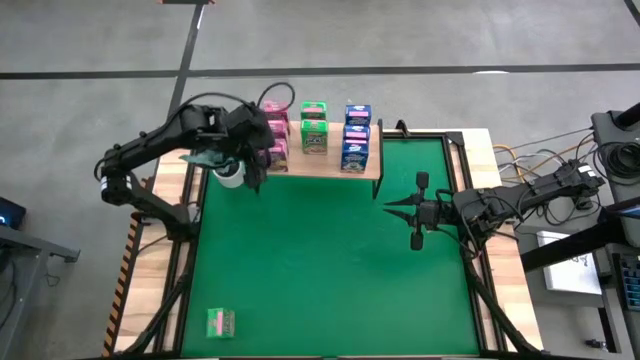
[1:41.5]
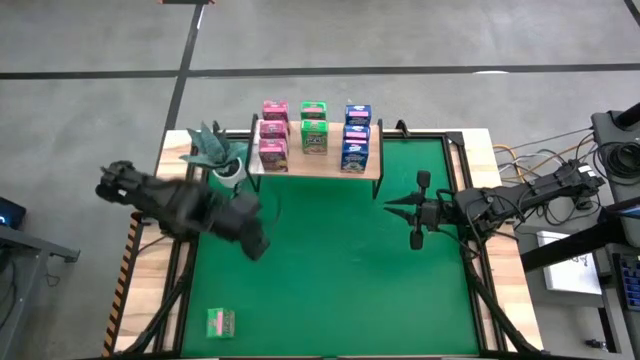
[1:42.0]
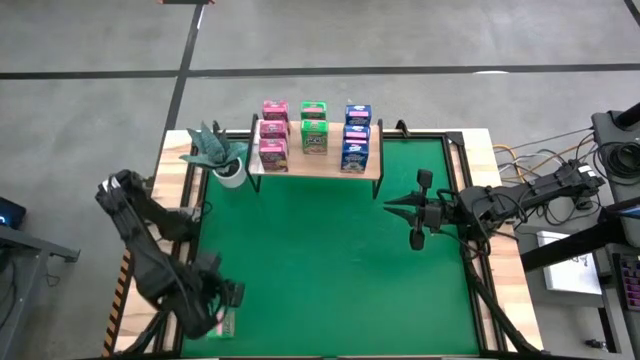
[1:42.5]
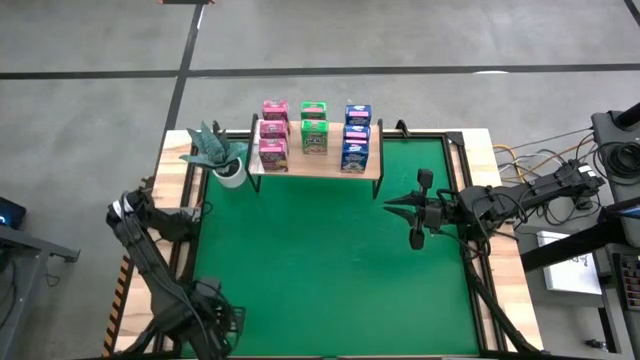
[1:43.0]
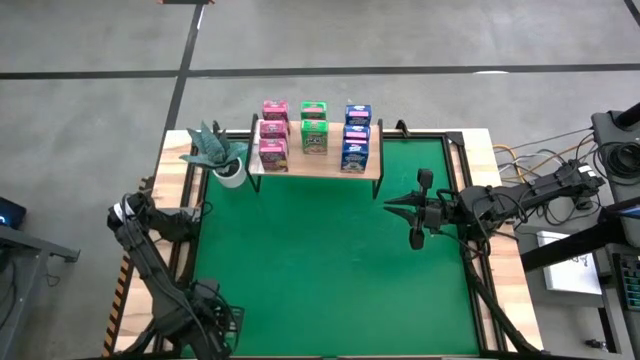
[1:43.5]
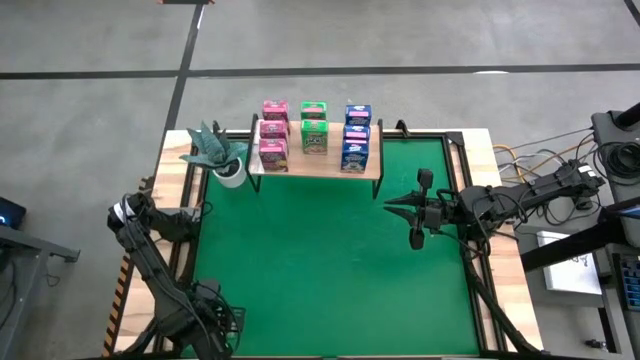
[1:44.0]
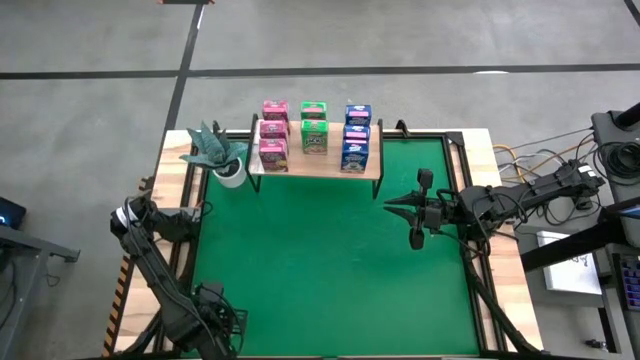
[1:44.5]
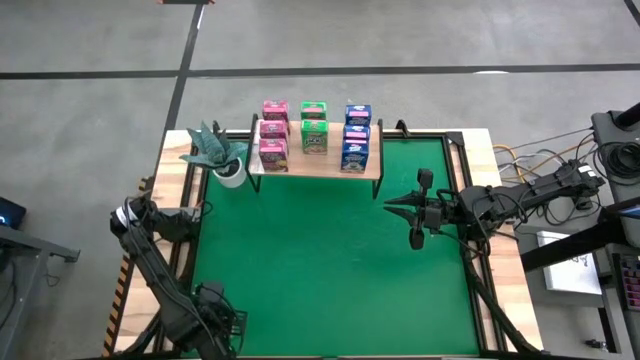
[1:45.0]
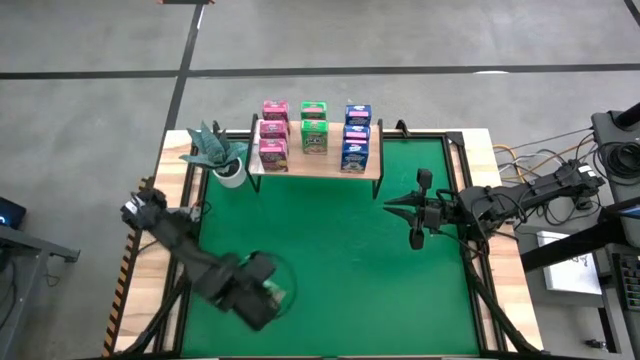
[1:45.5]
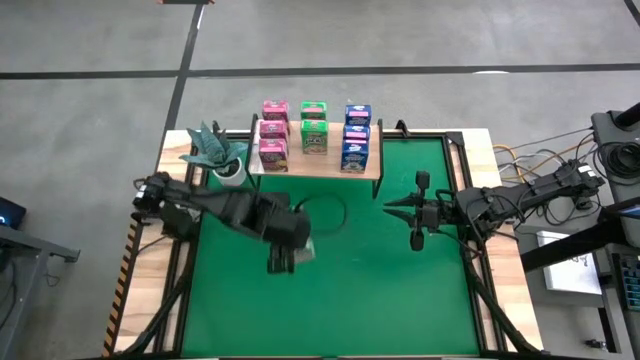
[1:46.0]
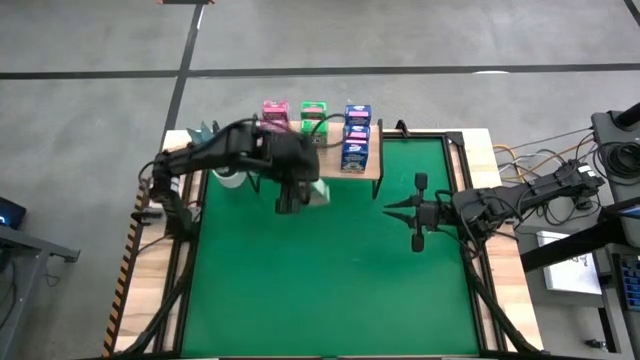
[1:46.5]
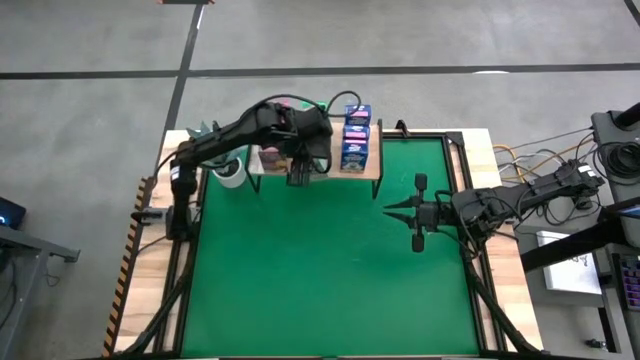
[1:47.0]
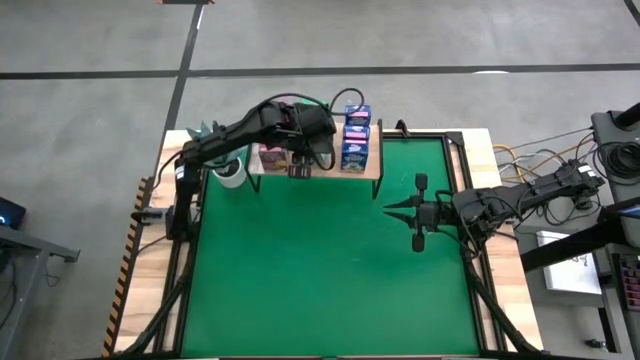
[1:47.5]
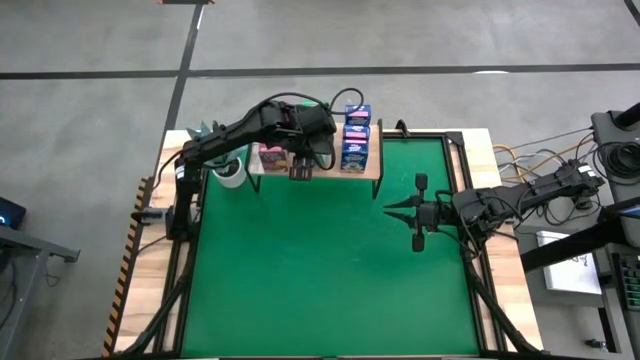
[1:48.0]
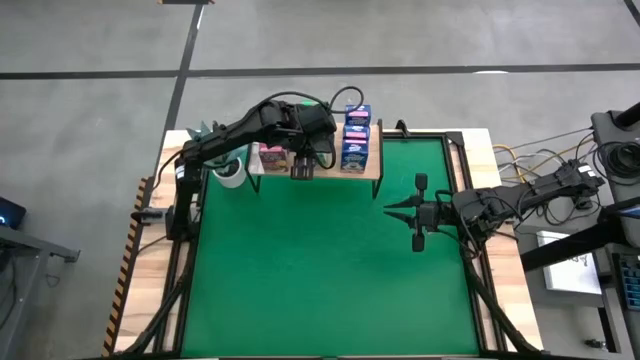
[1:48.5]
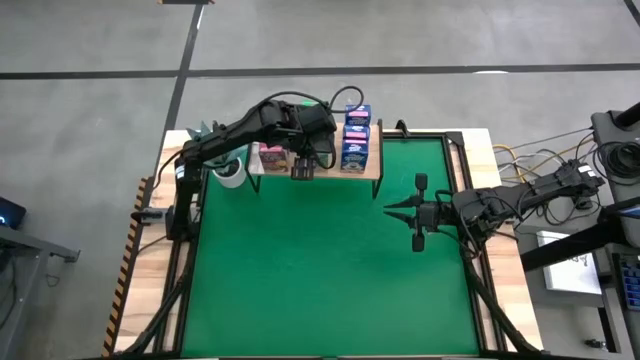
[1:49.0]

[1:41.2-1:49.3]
Task: Stack cereal on shelf
Put the green cereal box on the shelf aligned with the other green cereal boxes

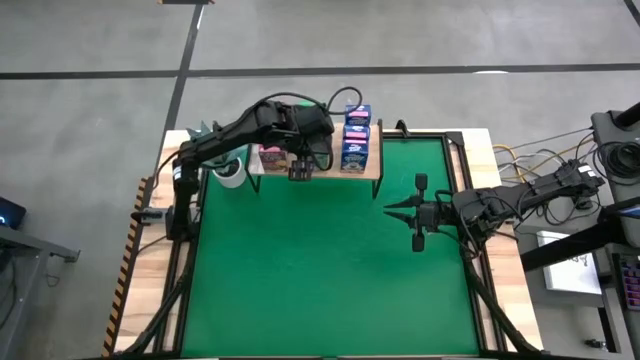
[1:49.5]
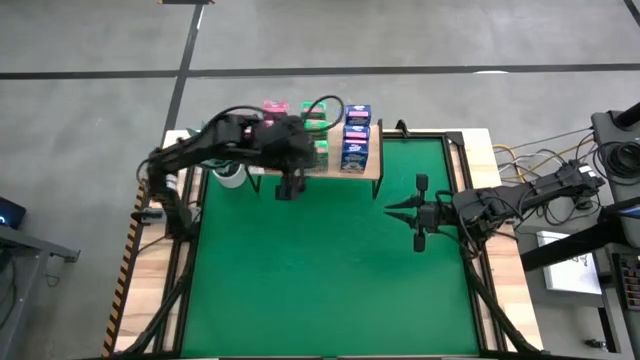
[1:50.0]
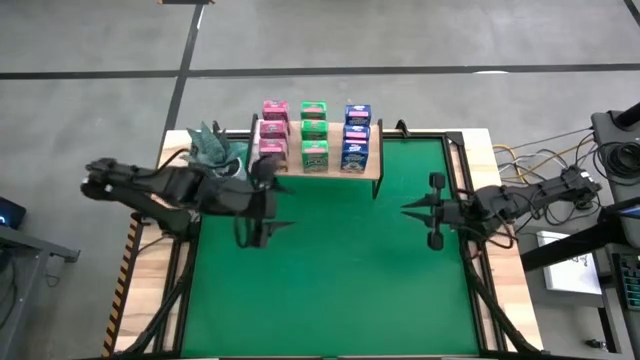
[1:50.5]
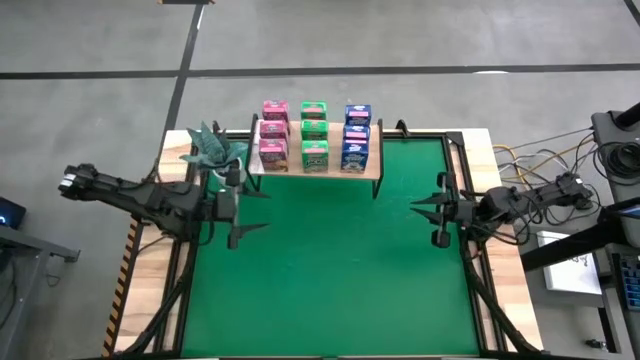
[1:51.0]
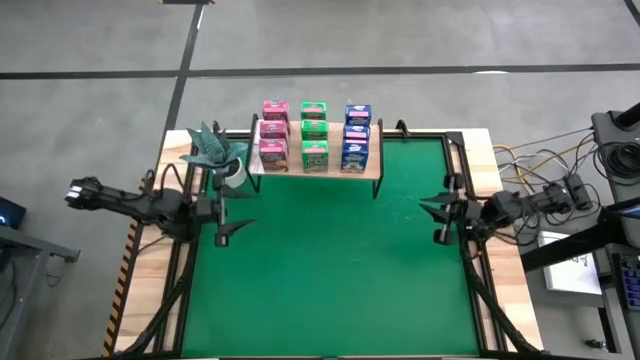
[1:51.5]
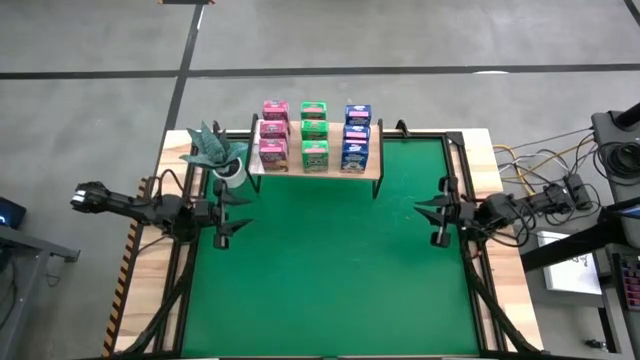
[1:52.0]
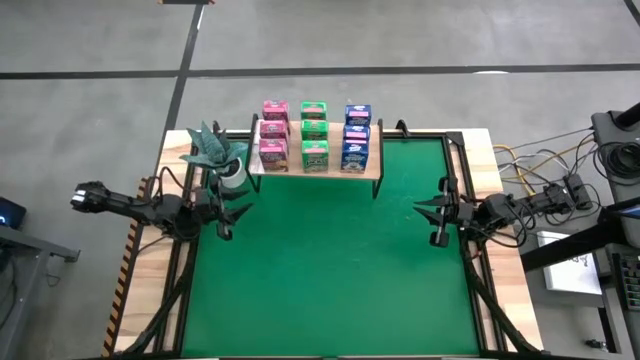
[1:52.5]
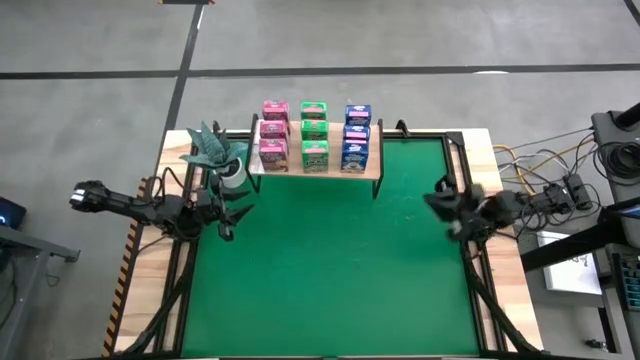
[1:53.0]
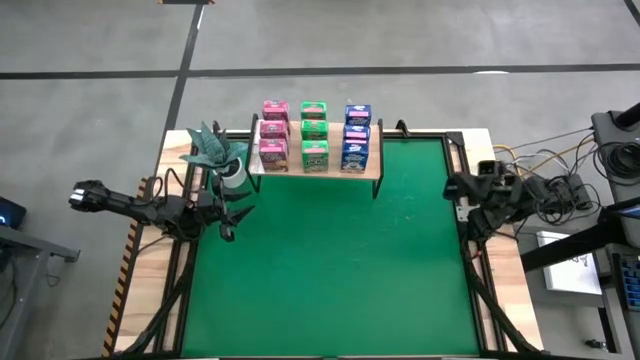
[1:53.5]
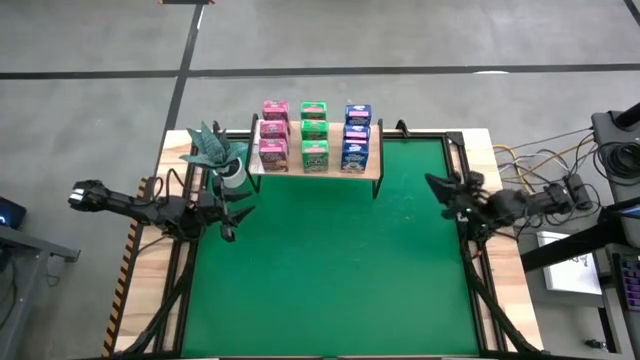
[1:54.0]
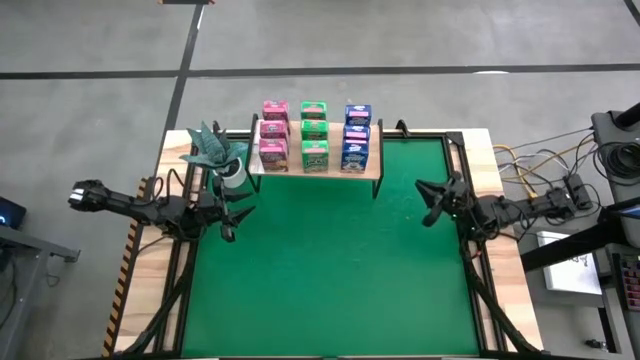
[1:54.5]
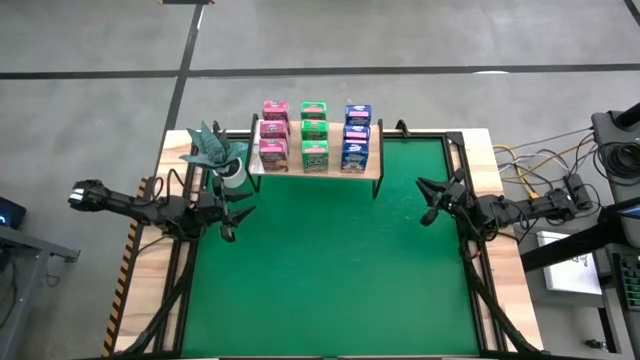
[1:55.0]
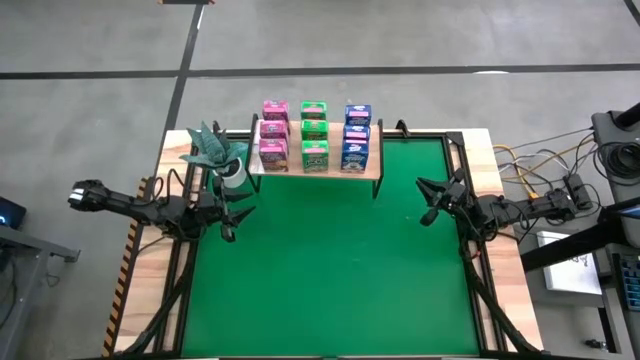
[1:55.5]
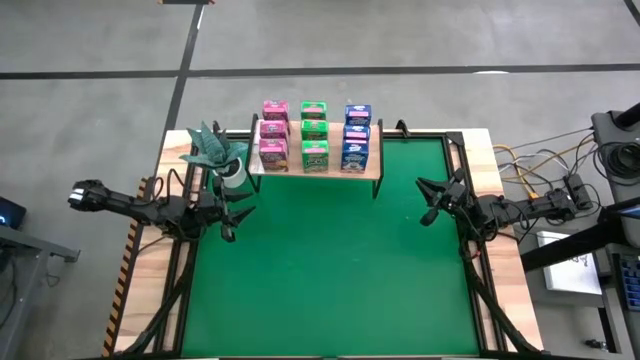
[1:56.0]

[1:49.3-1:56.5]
Return to Home Position

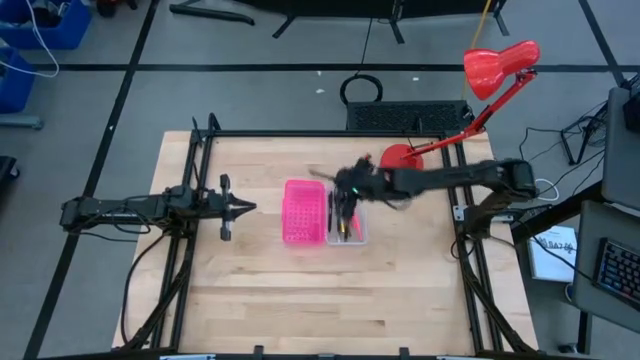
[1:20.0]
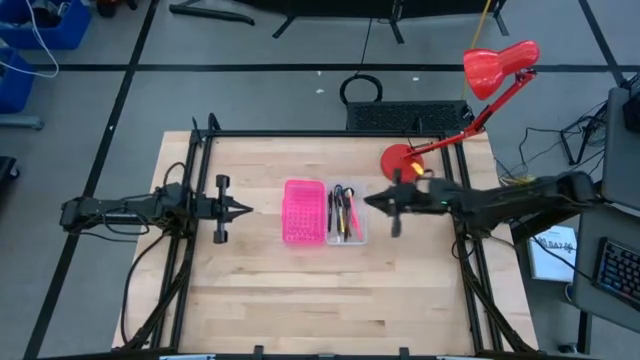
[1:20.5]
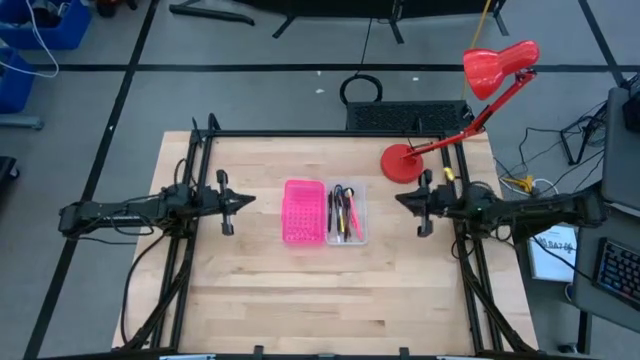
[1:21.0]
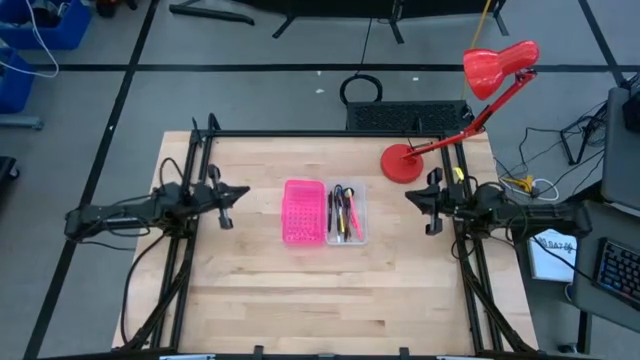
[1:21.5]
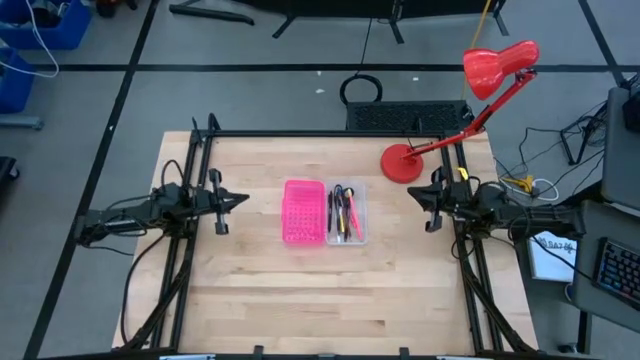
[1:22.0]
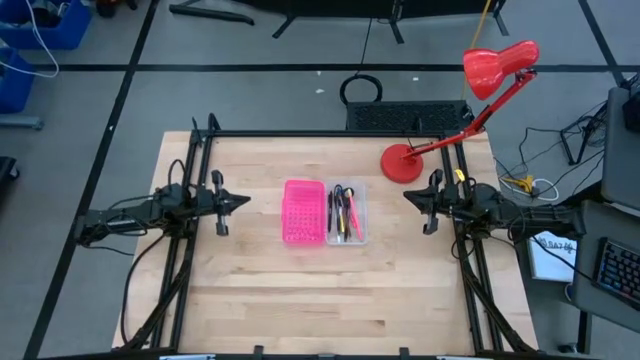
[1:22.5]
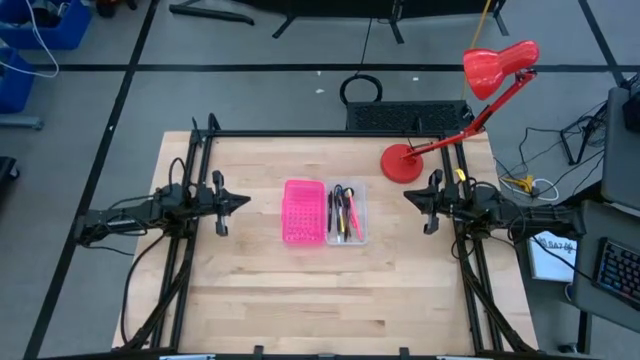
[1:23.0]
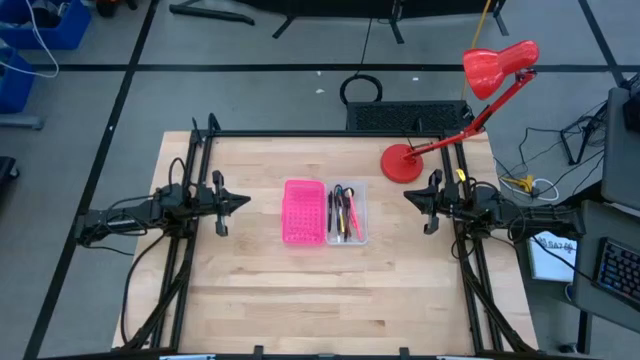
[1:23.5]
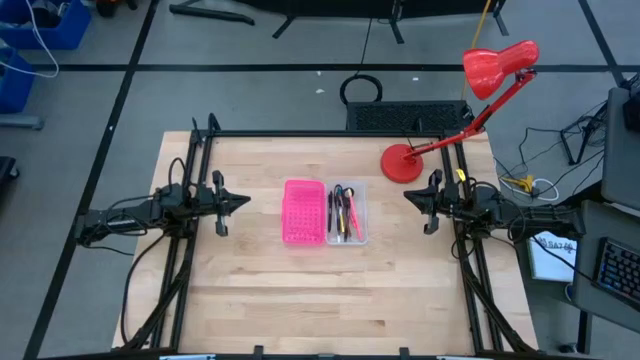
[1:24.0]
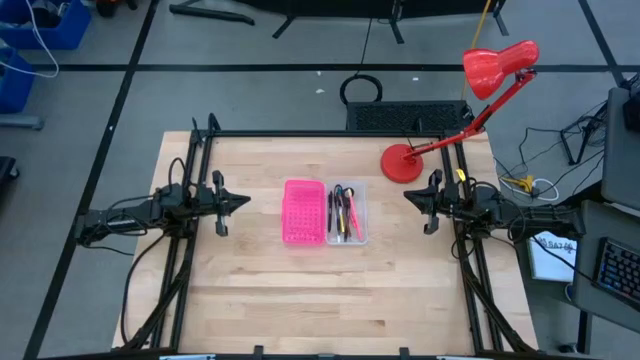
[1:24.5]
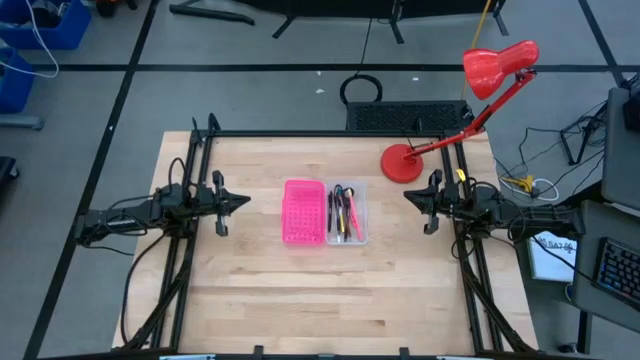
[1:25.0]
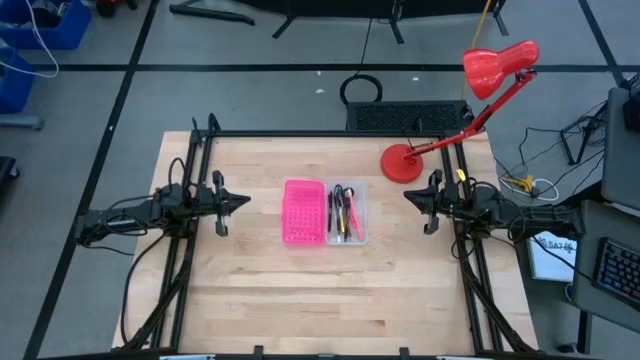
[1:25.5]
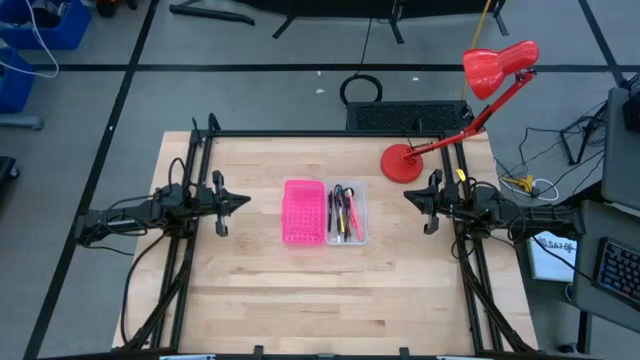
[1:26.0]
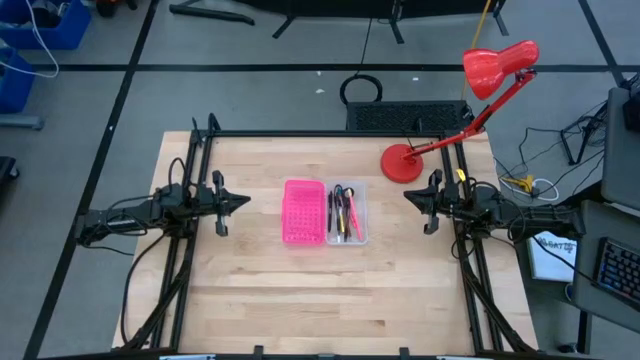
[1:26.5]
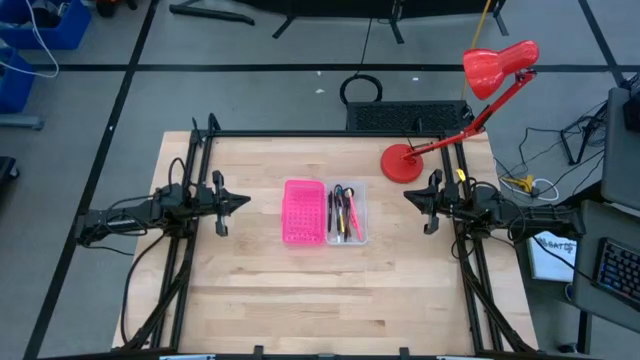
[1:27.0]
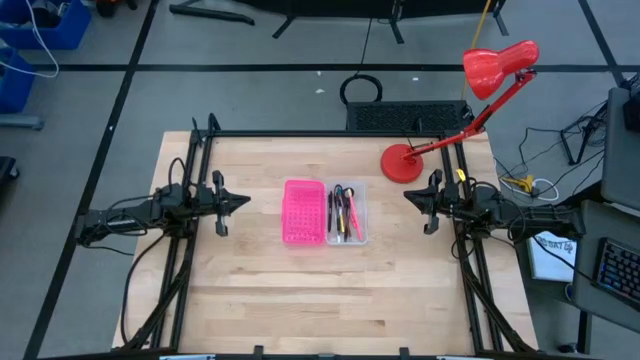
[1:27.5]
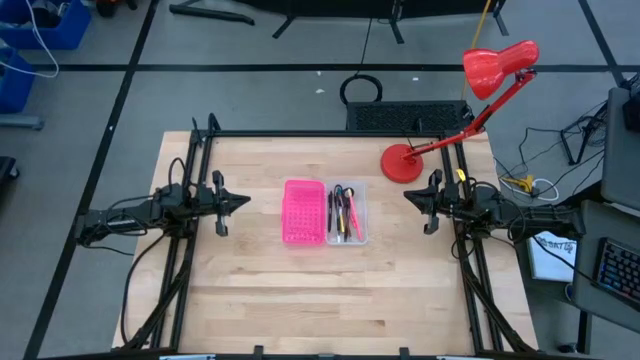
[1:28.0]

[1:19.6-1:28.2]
Task: Pick & place school supplies into a supply box
Return to Home Position
